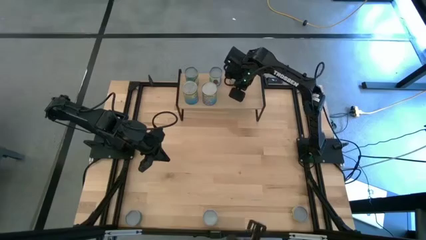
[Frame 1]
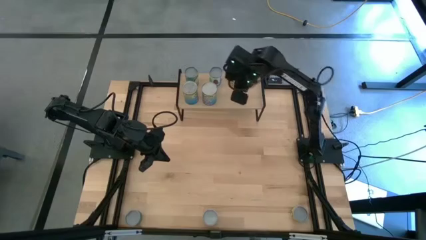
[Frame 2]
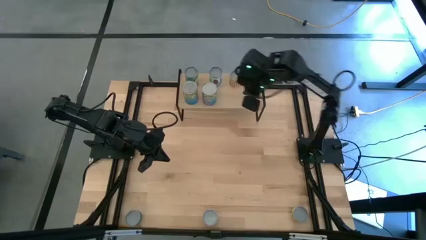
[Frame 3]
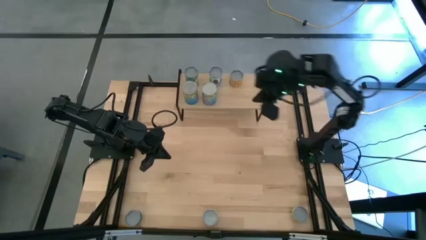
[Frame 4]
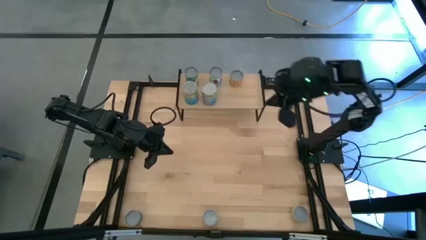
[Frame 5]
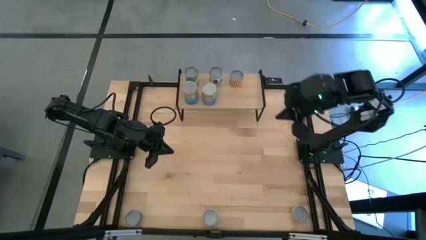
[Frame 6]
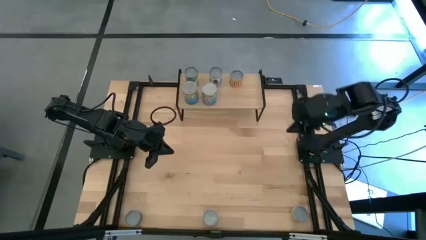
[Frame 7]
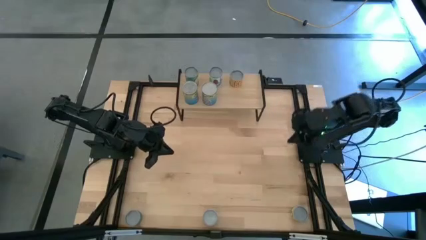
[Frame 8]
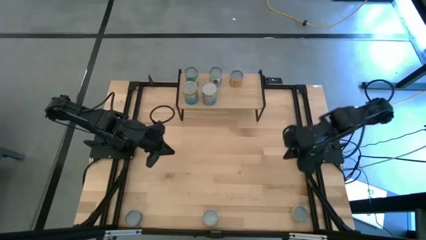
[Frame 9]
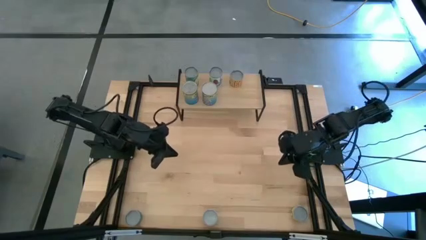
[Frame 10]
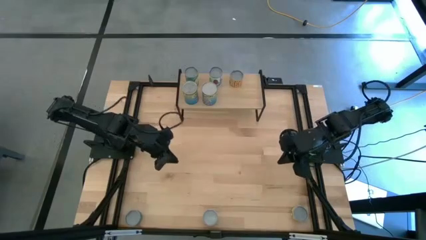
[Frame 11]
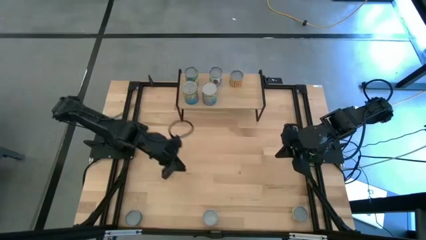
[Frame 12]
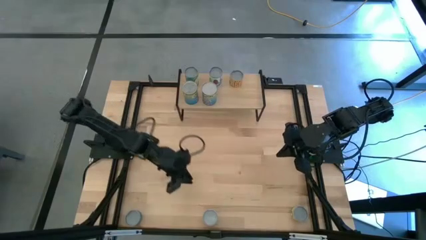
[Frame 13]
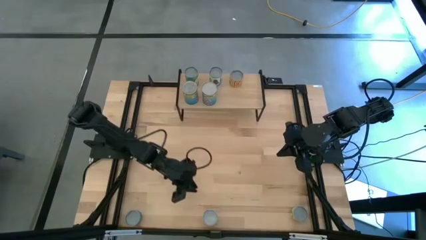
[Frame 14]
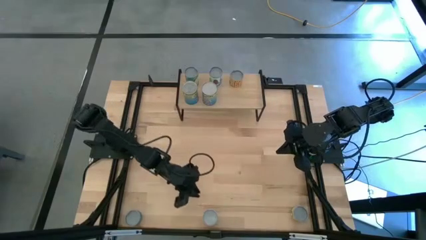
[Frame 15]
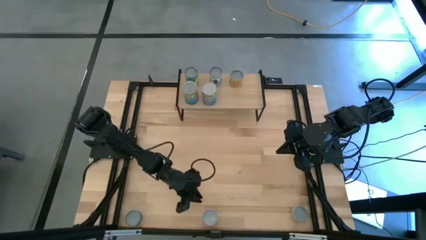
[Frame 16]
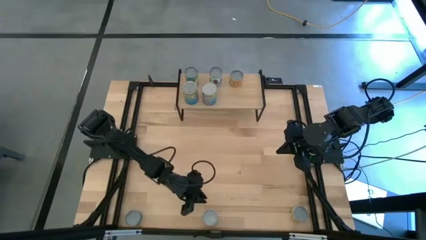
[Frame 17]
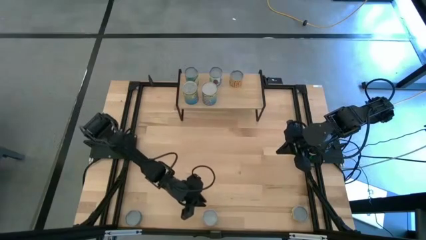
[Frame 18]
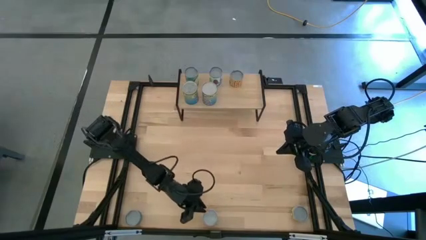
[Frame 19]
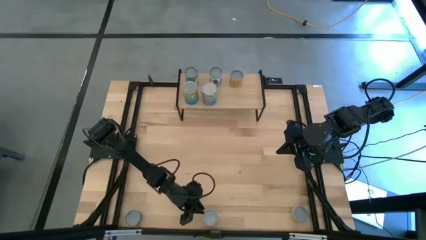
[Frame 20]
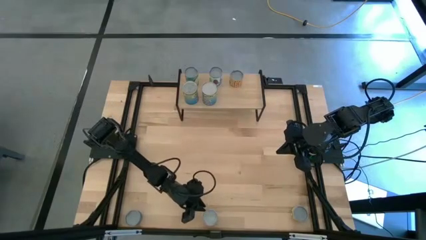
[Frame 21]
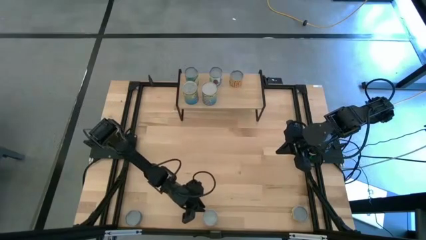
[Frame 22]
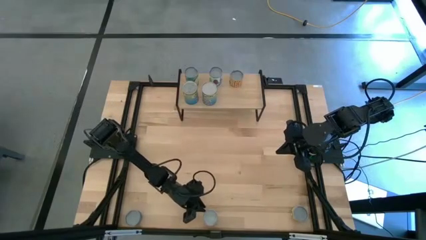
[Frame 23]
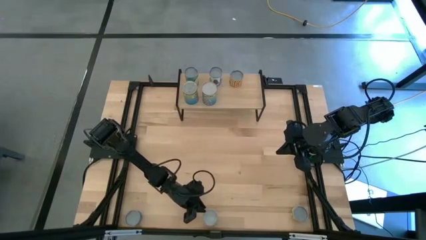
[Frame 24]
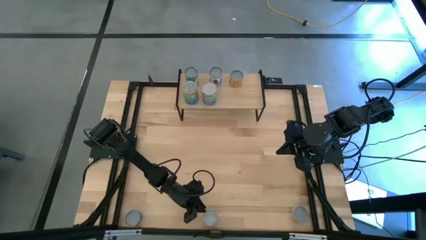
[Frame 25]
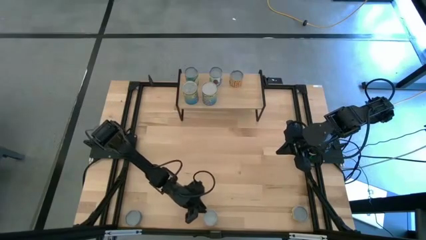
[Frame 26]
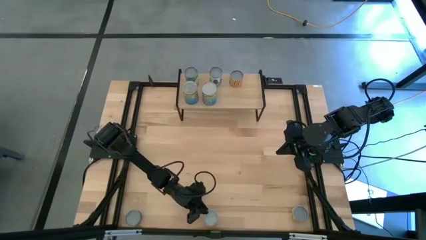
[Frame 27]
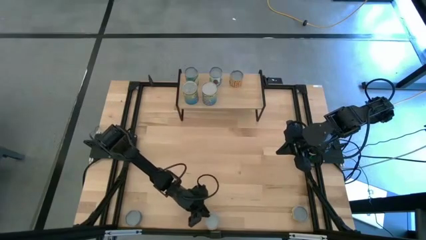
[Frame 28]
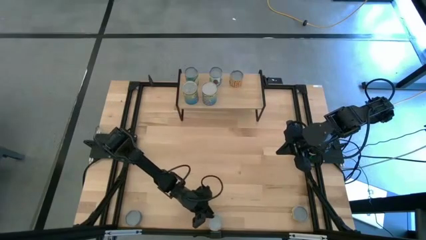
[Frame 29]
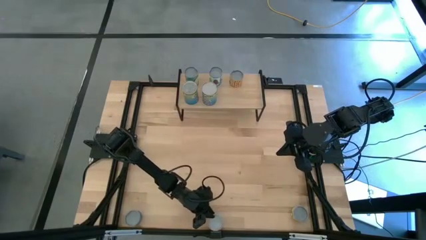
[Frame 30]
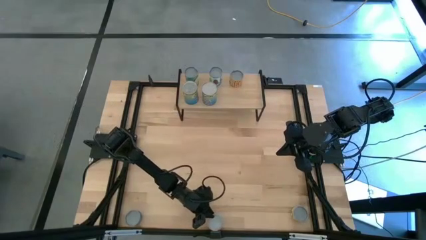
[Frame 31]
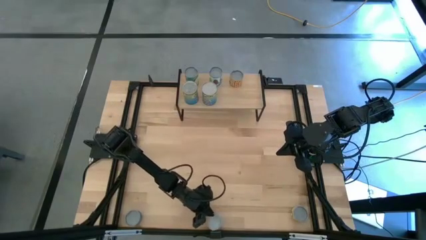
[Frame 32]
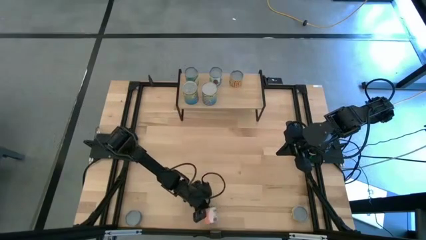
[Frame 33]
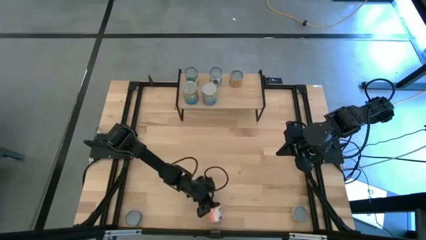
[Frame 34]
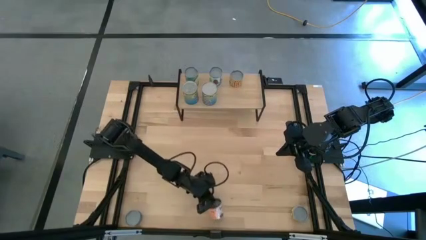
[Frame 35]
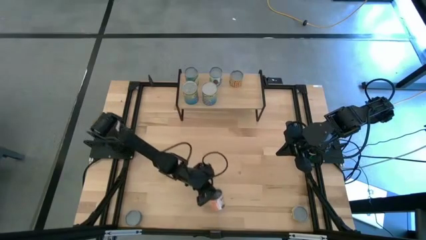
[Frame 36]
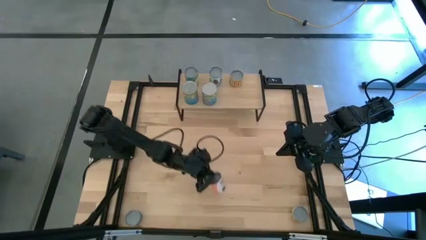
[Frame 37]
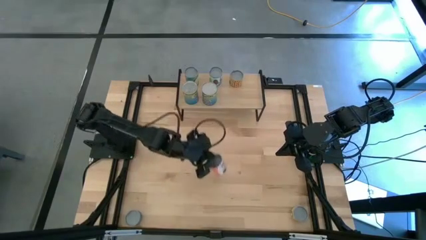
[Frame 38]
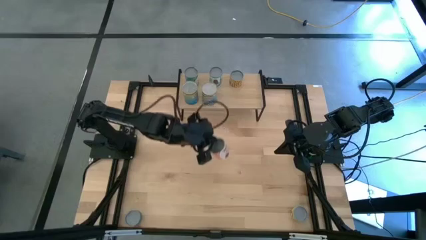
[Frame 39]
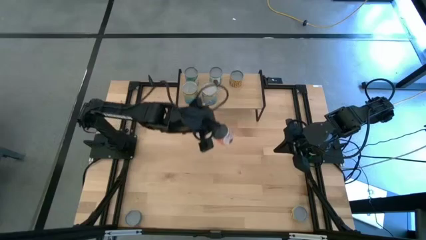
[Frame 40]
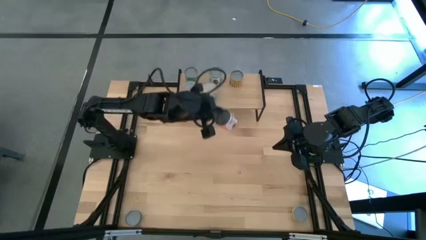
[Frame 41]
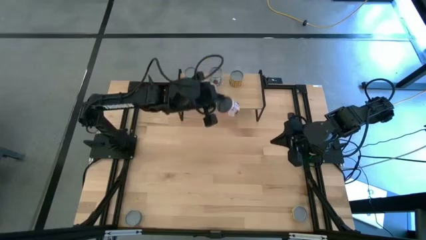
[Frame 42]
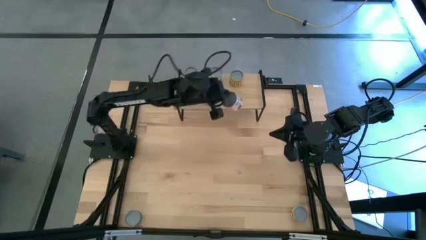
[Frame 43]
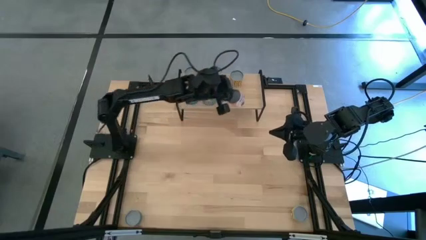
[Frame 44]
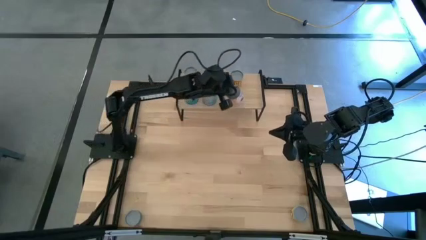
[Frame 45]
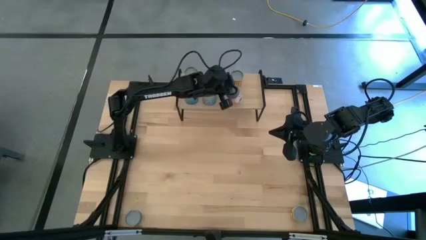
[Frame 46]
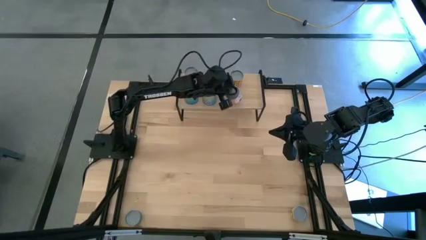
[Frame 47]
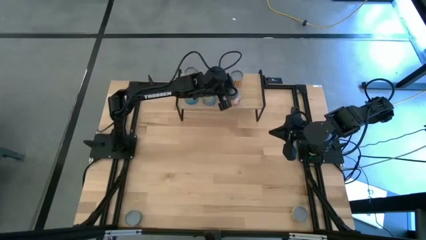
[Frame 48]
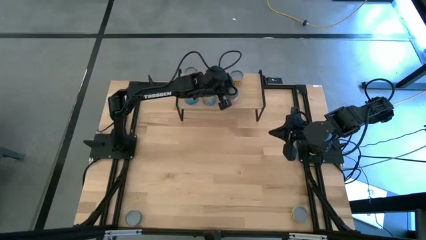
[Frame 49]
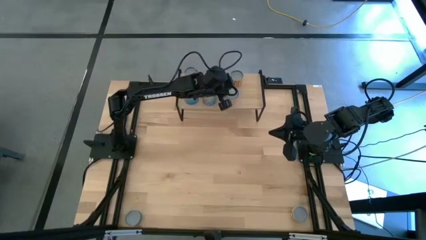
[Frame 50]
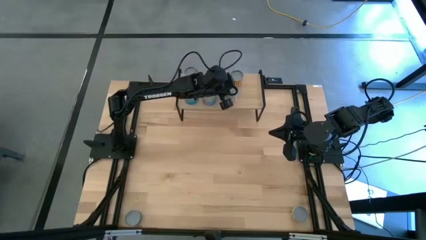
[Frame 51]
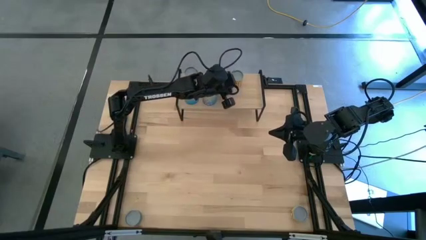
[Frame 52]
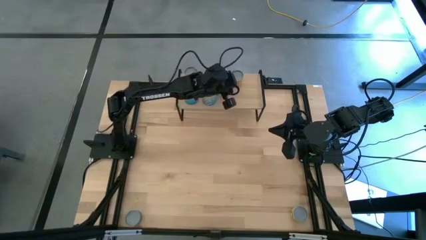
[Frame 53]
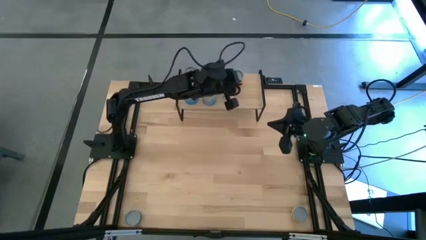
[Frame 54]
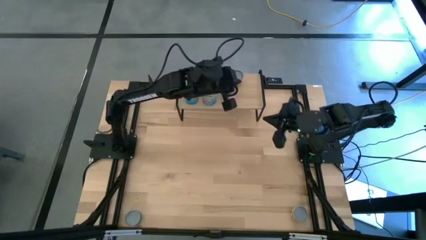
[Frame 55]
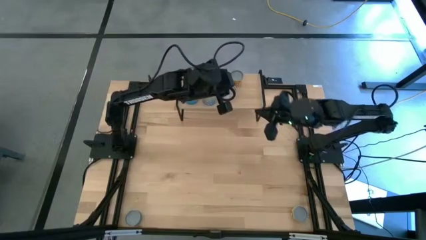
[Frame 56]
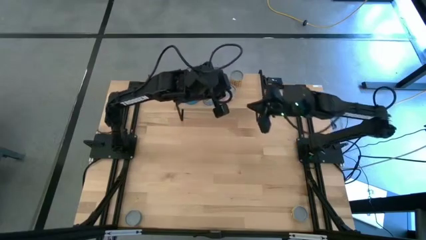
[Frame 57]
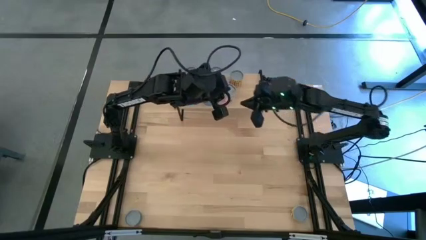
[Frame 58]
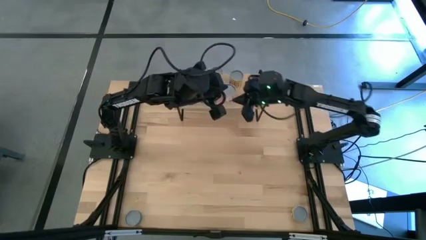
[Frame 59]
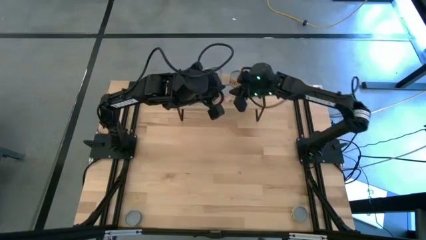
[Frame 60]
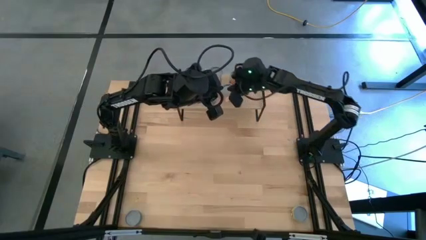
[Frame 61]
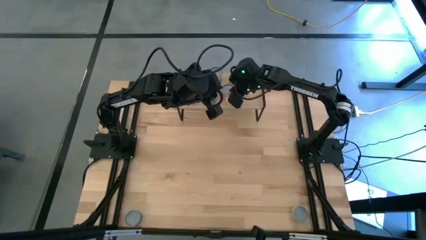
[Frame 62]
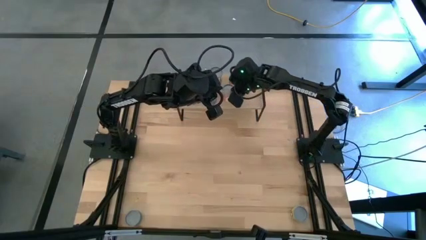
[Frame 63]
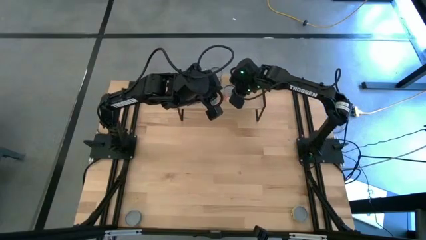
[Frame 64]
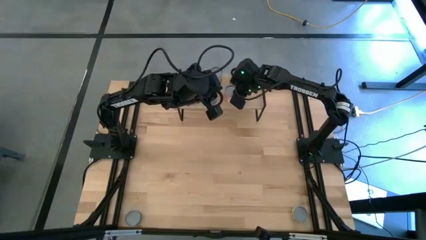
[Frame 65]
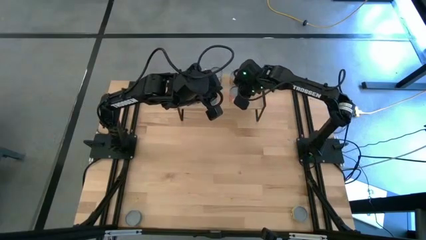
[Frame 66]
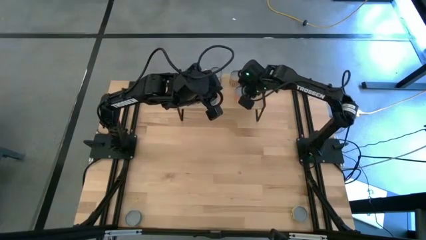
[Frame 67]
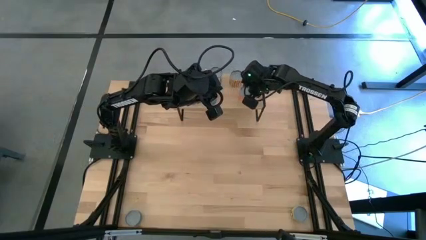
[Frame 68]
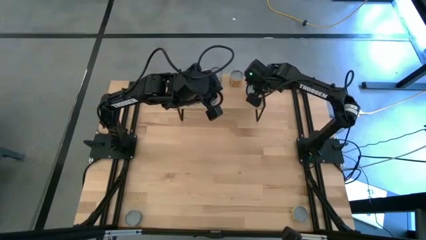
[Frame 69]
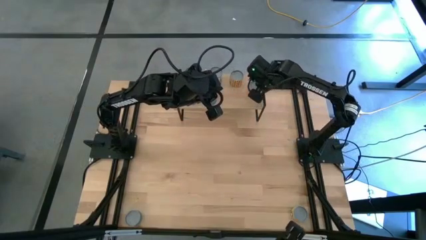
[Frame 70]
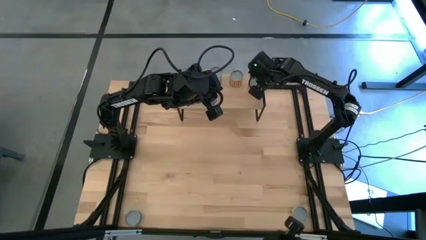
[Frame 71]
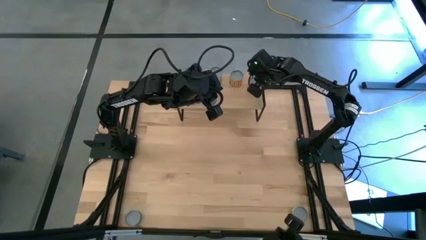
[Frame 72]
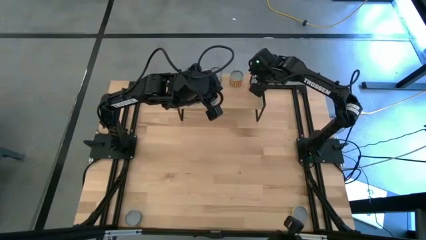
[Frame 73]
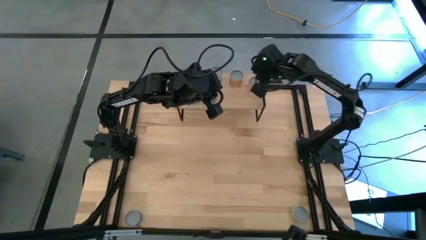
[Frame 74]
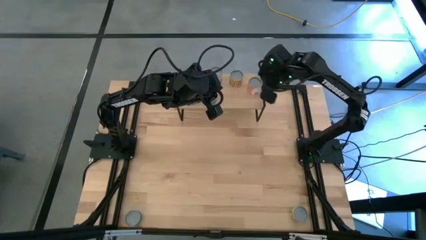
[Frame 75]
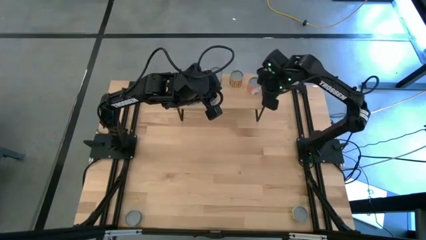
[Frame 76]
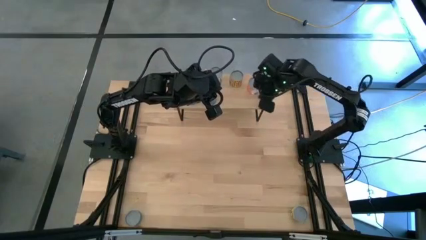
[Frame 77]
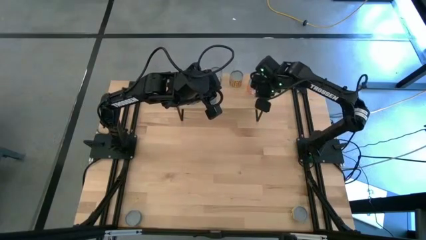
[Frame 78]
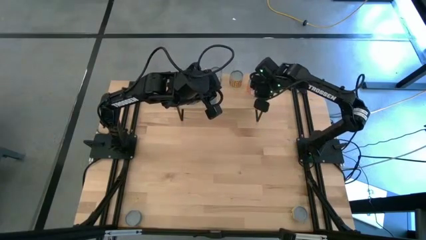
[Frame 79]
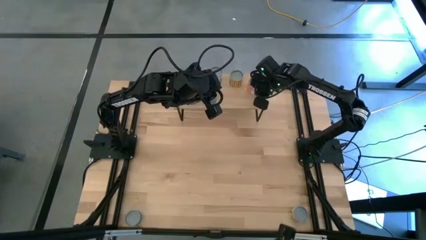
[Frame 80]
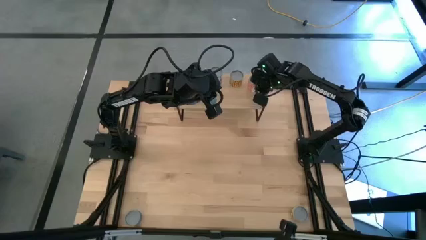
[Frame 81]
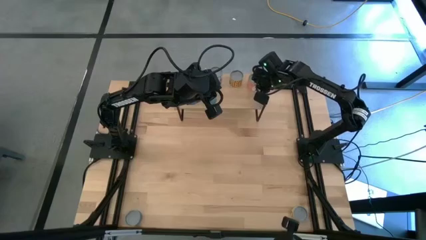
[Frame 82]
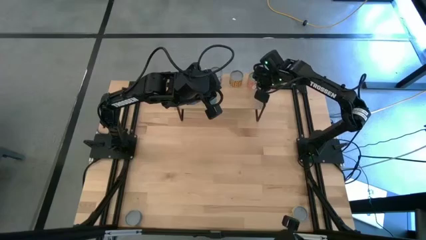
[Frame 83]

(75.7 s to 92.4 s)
Task: Pick and place cans onto a shelf
Put the canned meatballs on the shelf

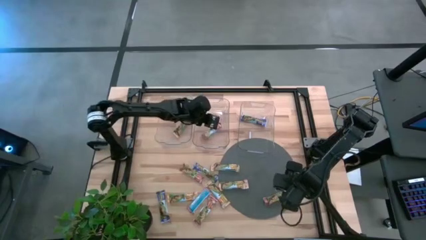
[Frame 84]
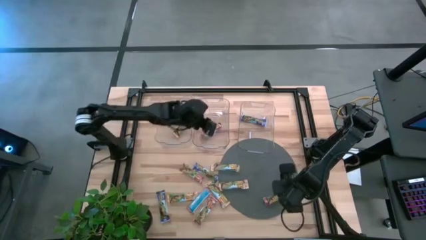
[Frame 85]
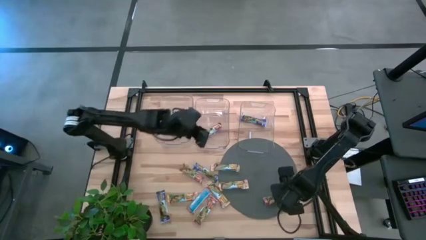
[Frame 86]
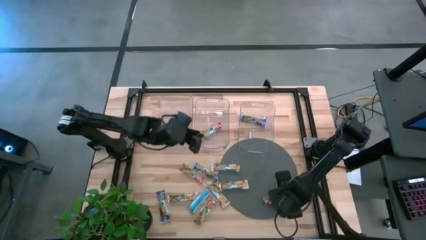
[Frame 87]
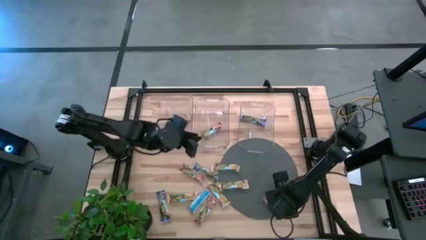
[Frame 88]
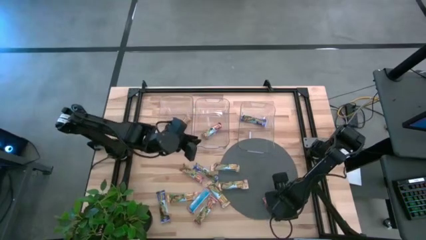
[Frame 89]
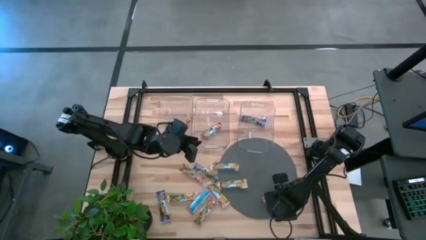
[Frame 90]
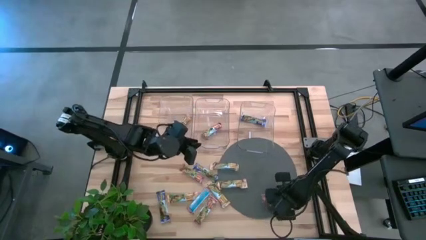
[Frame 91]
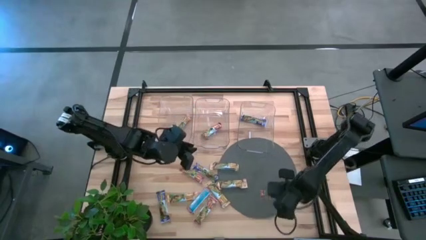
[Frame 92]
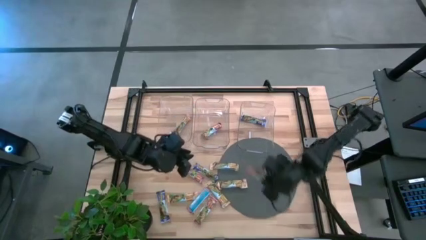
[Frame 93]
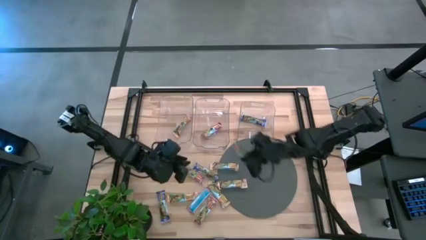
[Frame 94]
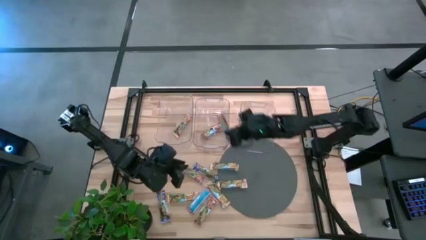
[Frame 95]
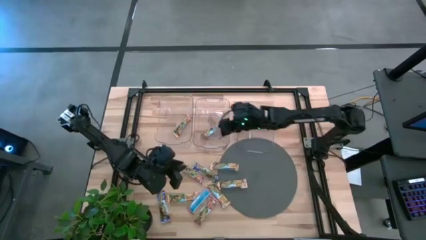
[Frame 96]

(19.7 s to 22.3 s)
Task: Pick and place Granola Bars by type
Put the red granola bar into the middle transparent bin
